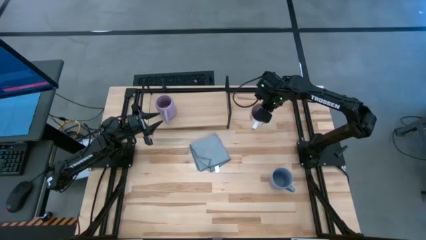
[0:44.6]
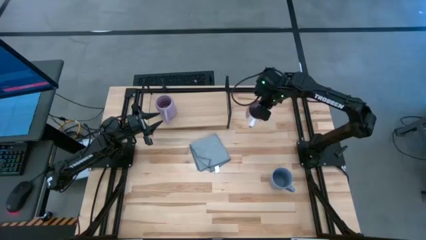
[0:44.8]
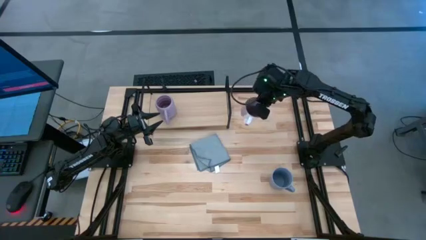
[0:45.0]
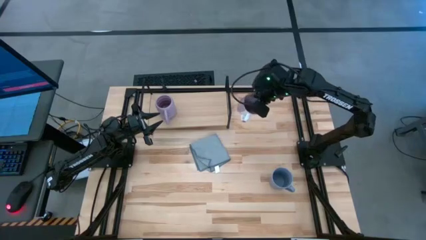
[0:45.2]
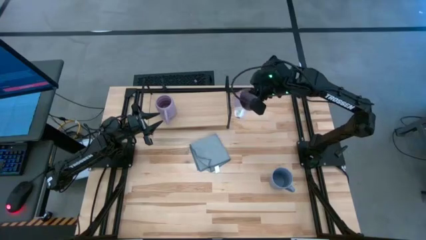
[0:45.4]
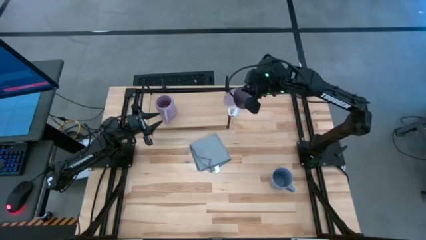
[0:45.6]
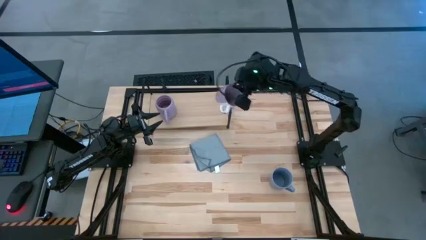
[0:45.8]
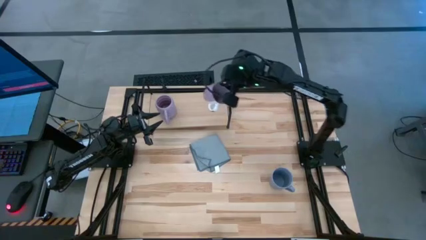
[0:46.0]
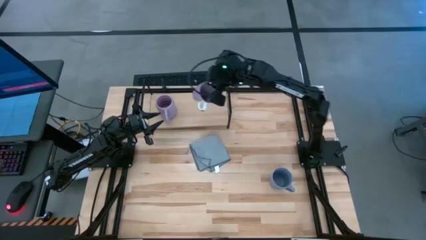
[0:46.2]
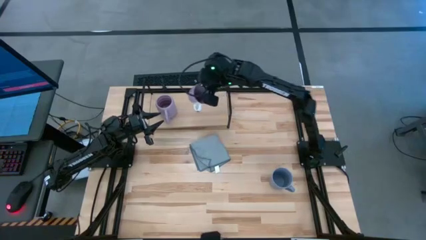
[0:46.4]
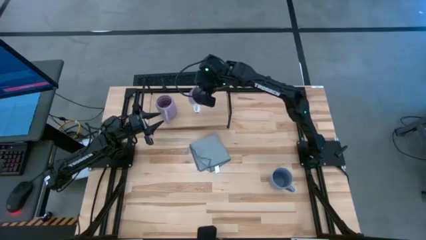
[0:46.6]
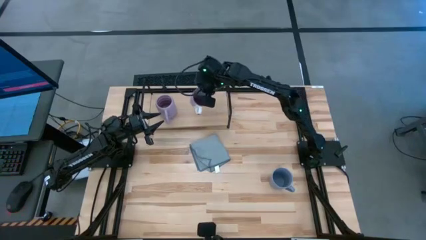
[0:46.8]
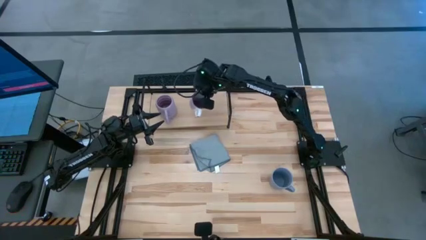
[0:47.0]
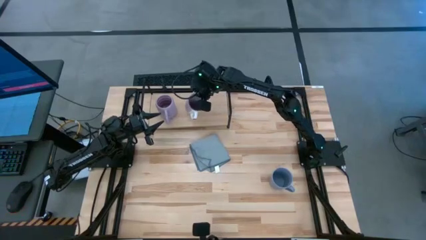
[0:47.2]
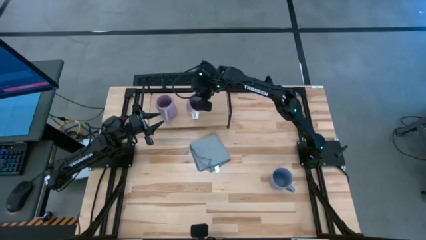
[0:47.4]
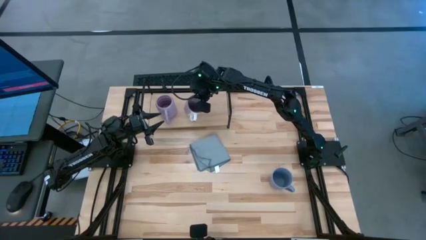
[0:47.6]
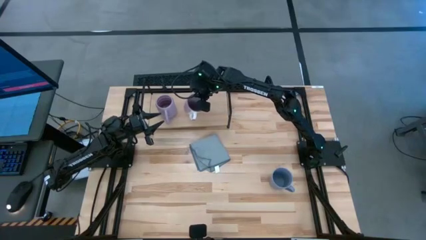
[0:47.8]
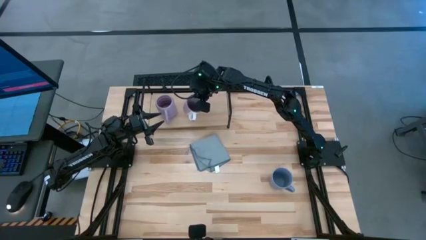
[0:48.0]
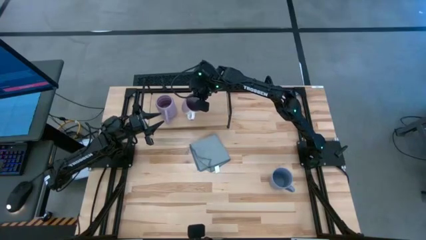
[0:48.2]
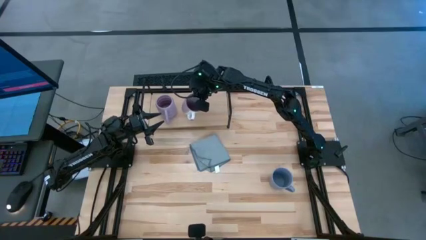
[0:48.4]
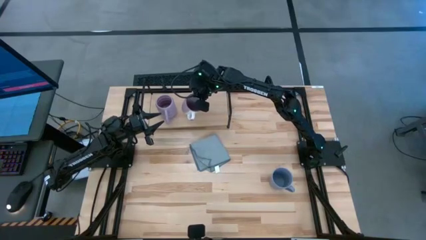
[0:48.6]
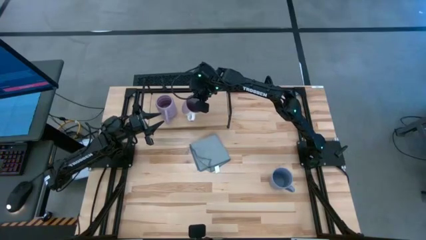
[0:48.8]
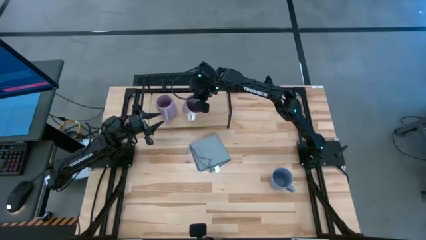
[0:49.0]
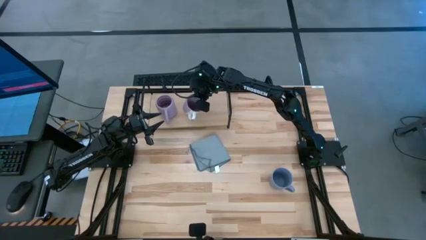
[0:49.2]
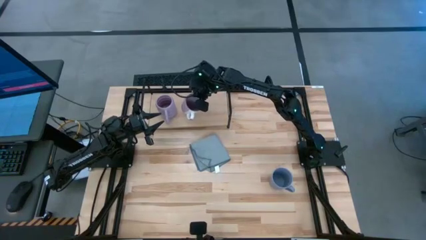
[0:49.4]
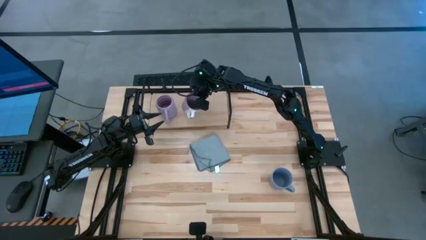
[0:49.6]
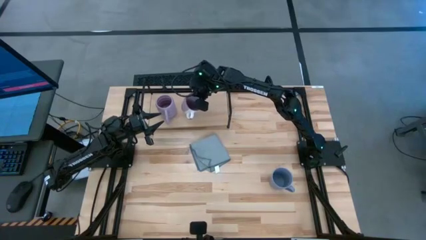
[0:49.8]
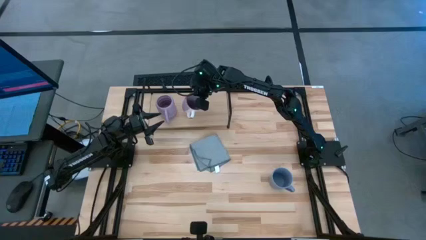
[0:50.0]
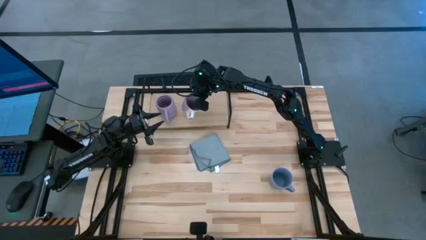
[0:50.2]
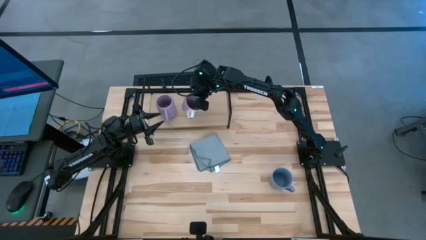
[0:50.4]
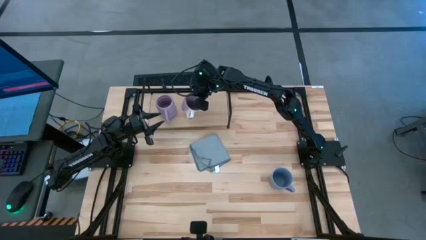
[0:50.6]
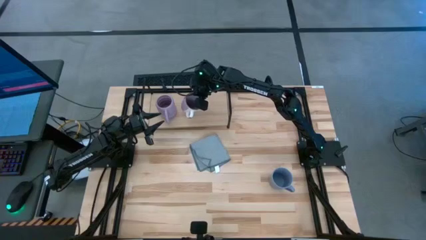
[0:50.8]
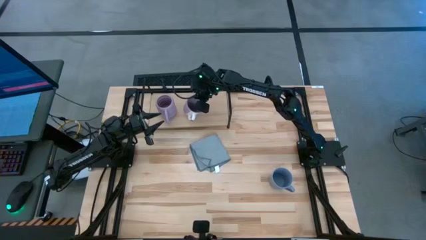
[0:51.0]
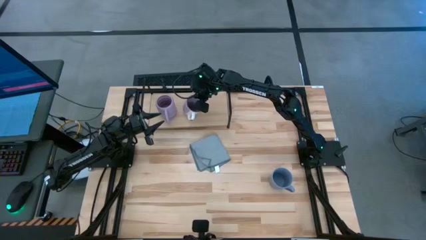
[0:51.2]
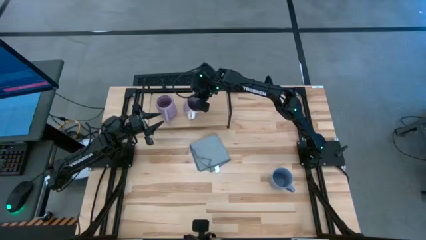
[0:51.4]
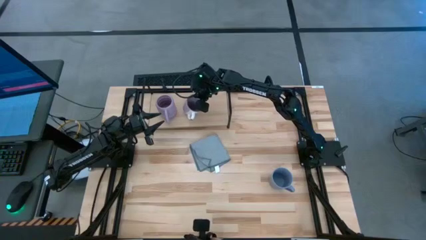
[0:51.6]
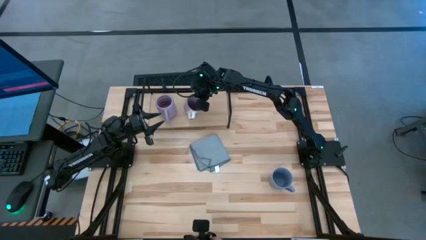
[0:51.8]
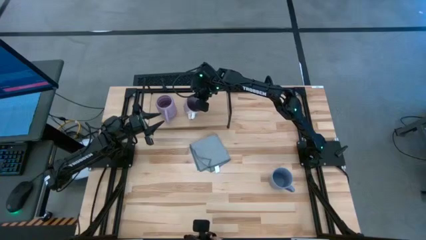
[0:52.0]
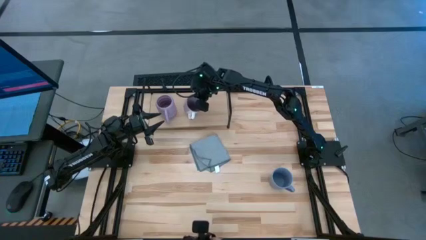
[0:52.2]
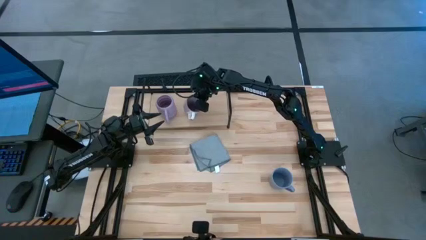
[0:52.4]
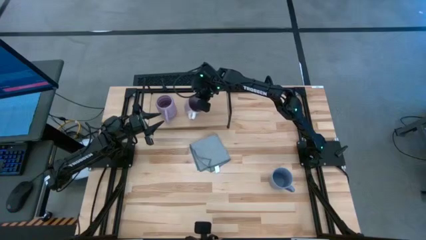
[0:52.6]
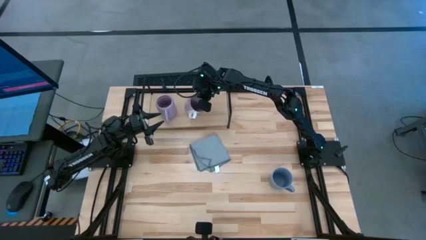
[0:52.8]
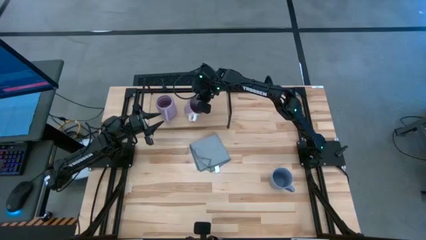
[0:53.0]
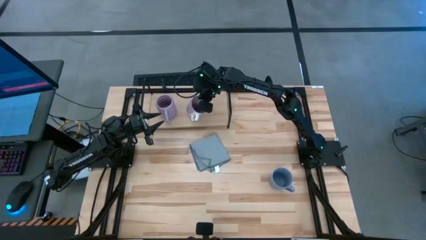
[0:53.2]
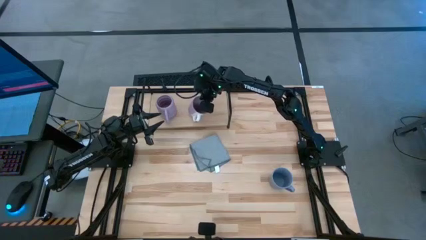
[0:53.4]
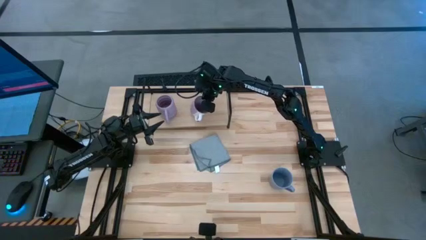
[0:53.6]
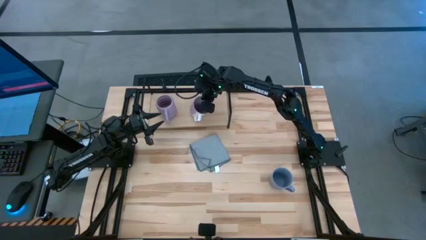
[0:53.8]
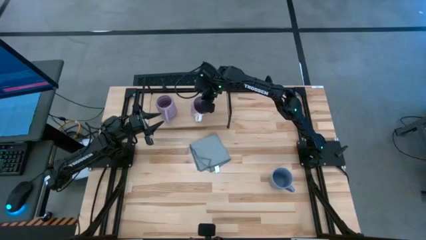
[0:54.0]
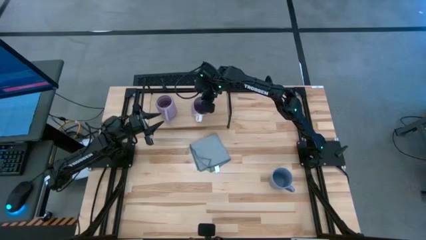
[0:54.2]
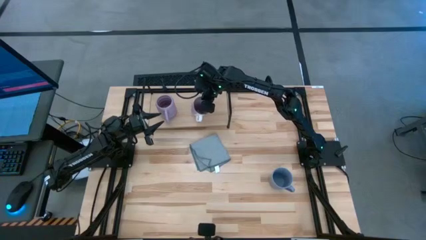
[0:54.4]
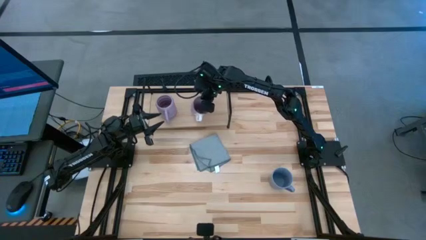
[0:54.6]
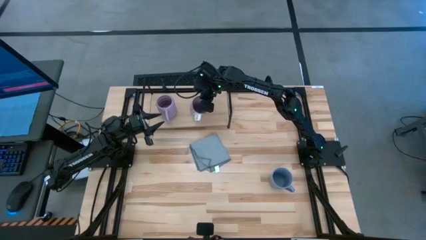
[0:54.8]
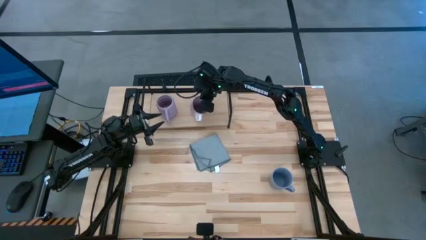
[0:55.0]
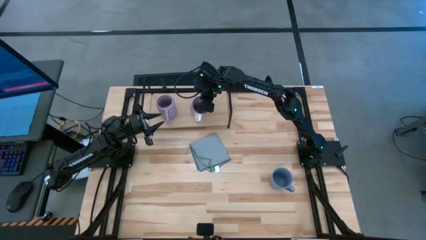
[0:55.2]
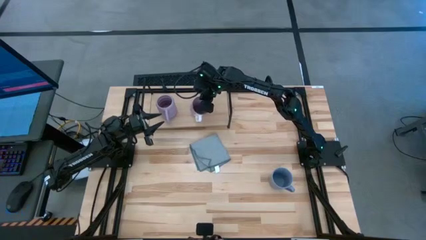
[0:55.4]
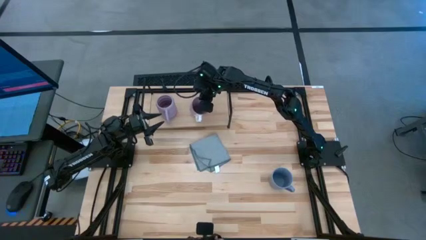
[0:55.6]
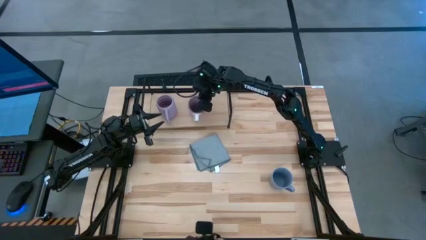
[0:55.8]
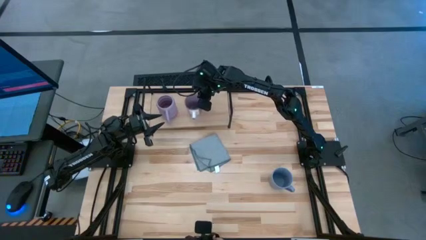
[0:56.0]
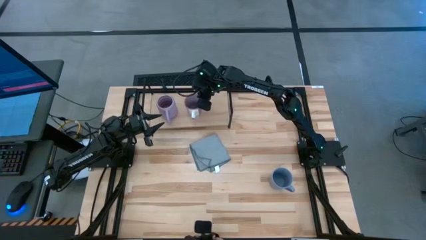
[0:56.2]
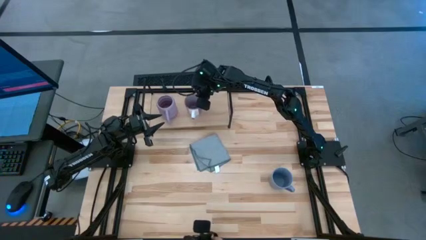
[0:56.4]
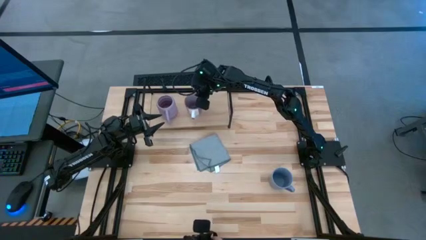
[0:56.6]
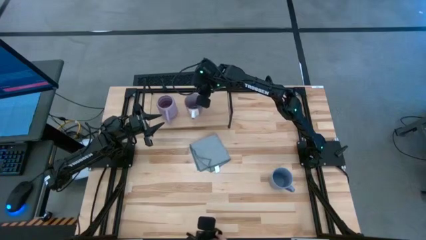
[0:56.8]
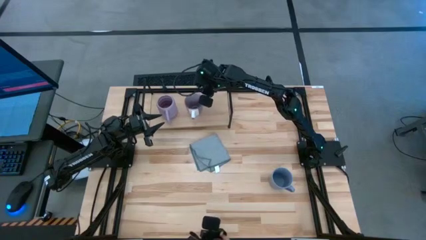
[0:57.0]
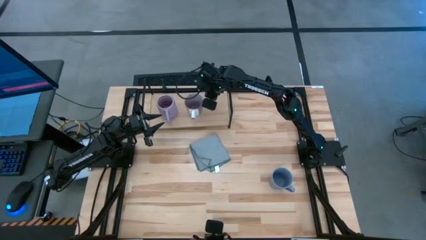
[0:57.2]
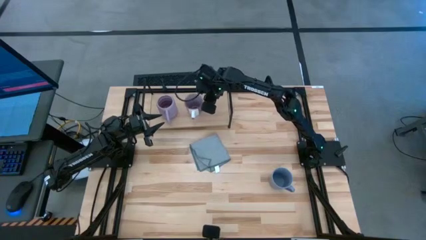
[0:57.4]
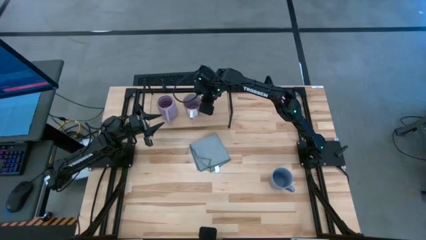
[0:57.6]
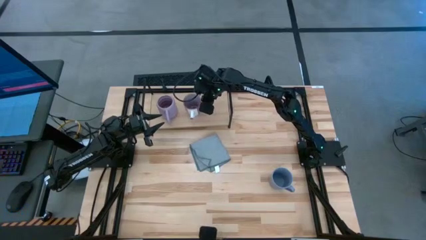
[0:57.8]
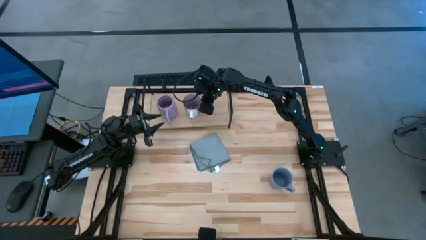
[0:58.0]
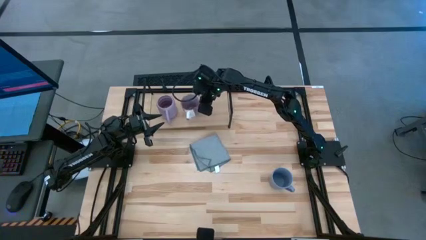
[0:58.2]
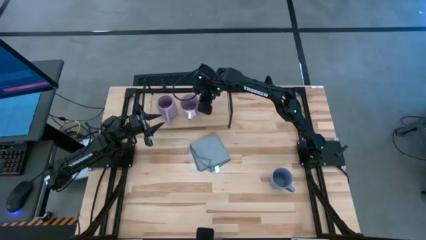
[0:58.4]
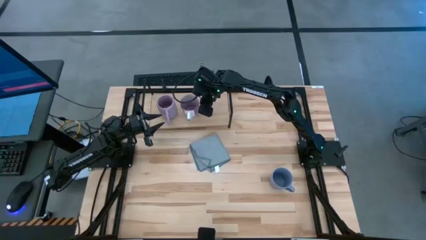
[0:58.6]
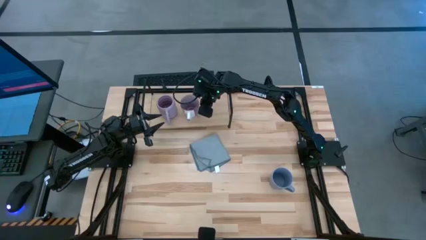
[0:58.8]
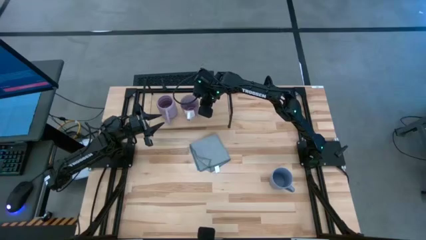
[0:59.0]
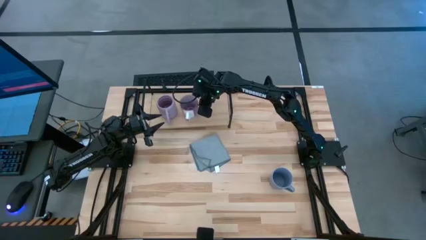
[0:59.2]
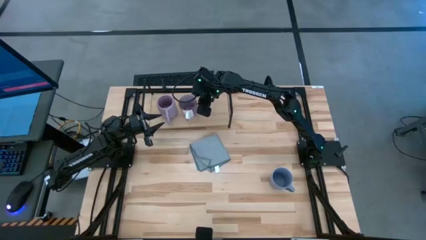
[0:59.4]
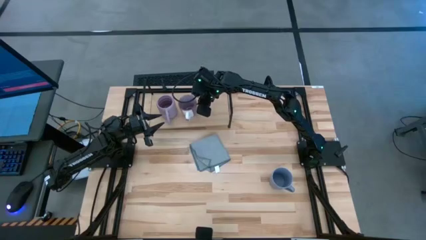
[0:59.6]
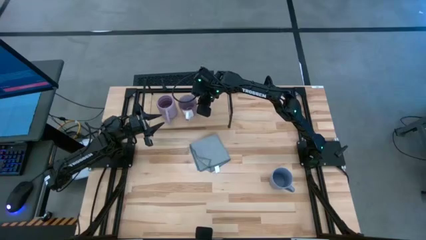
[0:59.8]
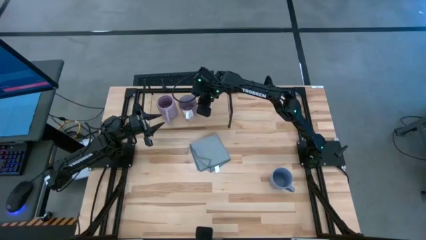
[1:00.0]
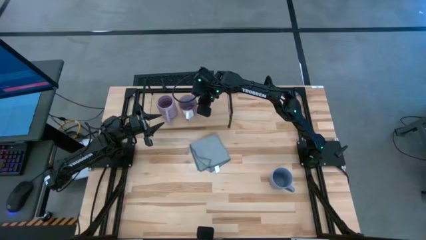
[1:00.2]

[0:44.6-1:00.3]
Task: Stack small to large cups/mugs on shelf
Put the violet patterned mug on the shelf
